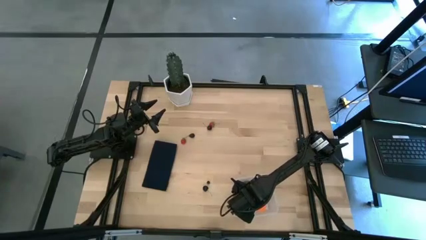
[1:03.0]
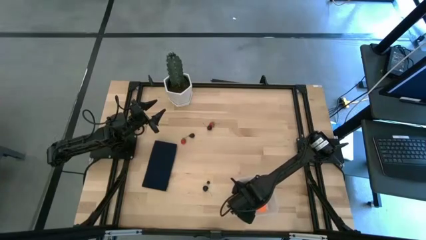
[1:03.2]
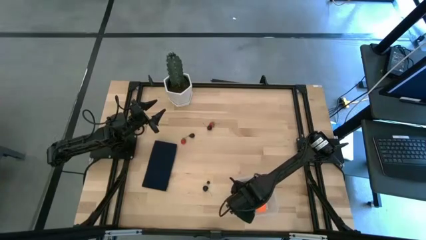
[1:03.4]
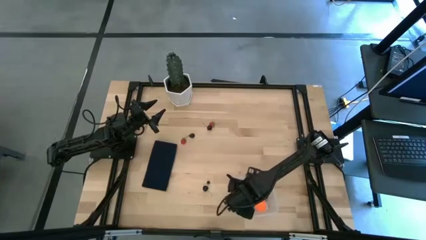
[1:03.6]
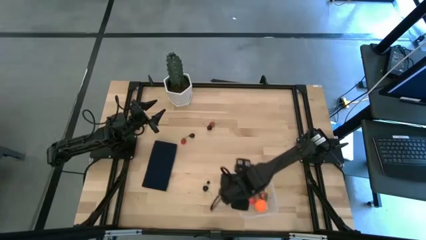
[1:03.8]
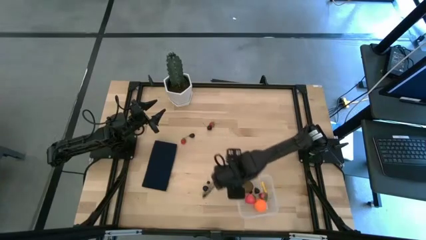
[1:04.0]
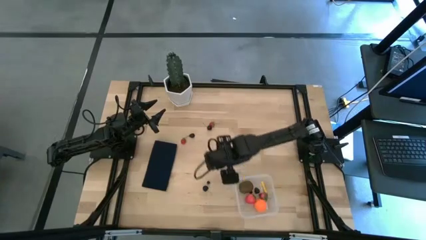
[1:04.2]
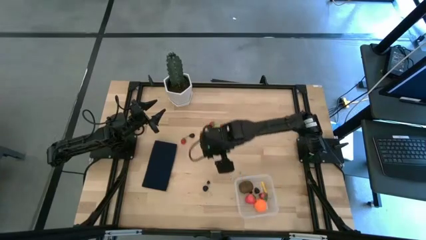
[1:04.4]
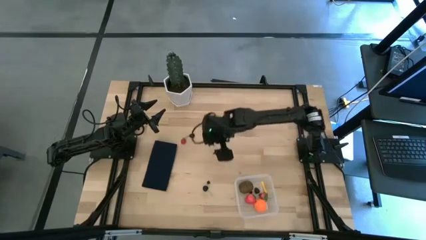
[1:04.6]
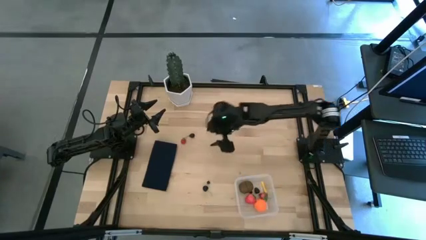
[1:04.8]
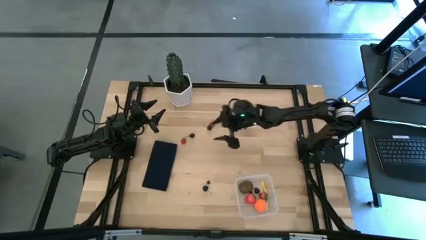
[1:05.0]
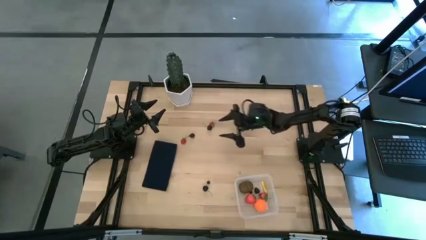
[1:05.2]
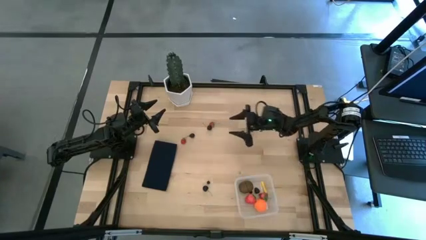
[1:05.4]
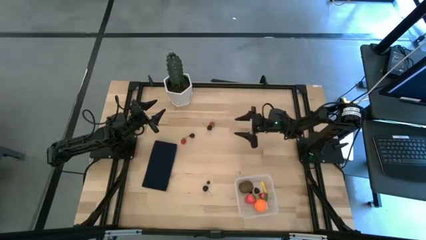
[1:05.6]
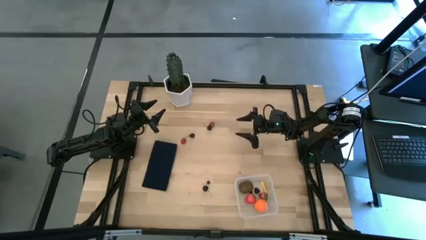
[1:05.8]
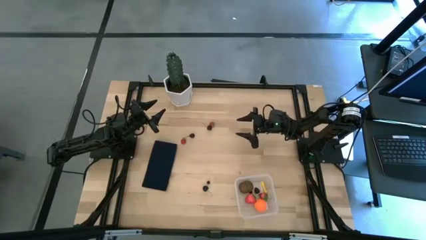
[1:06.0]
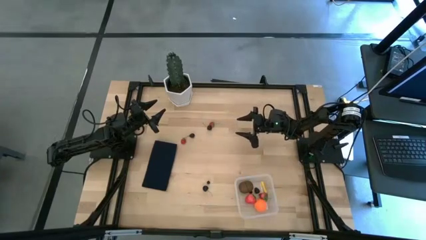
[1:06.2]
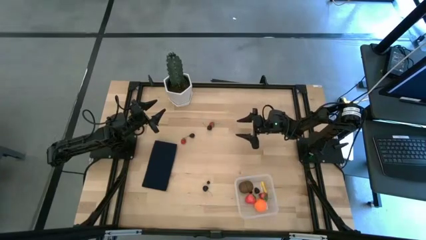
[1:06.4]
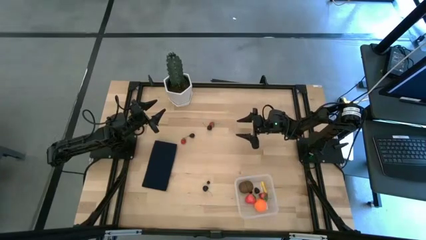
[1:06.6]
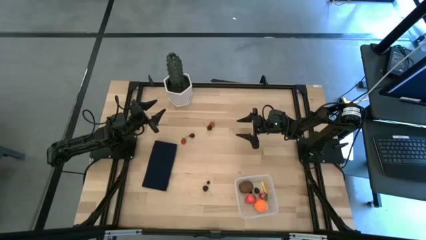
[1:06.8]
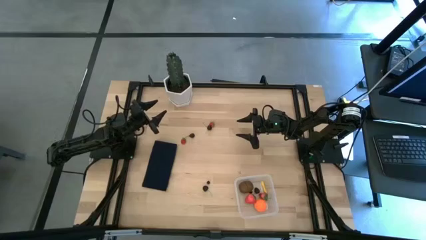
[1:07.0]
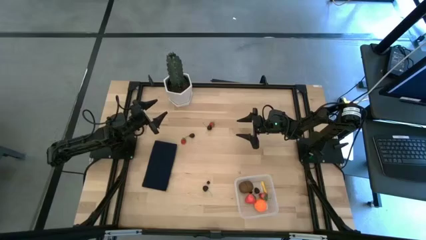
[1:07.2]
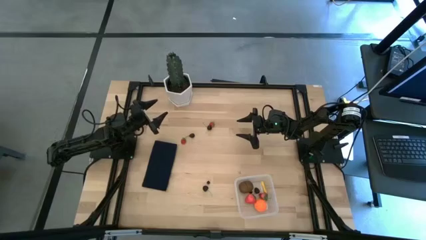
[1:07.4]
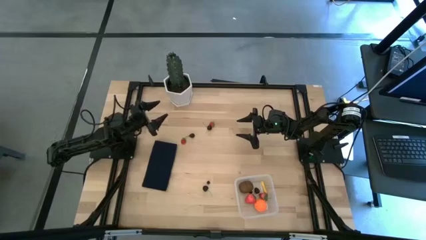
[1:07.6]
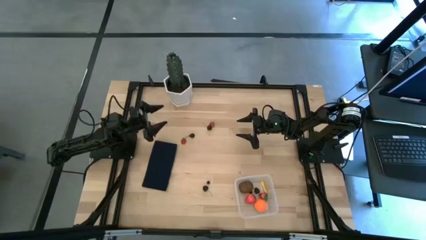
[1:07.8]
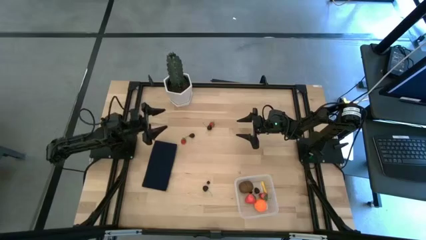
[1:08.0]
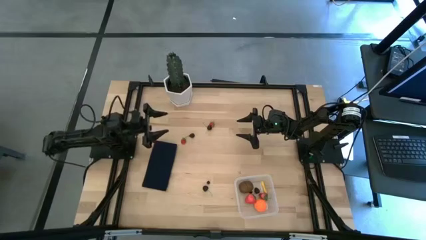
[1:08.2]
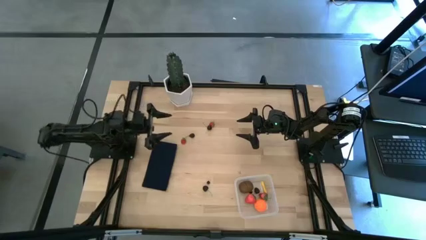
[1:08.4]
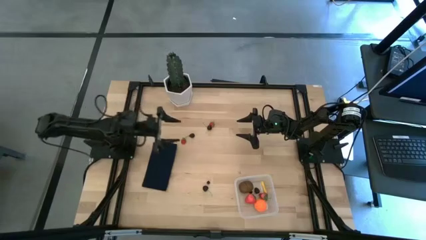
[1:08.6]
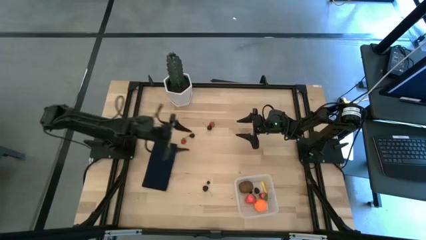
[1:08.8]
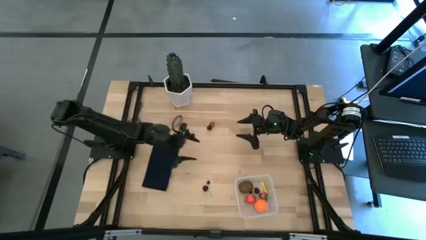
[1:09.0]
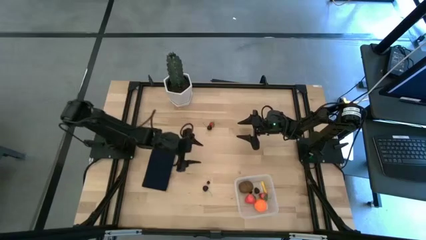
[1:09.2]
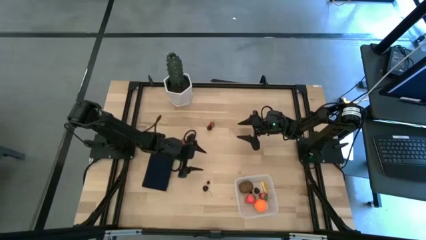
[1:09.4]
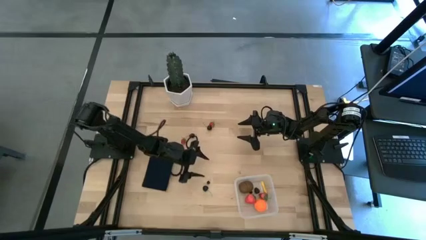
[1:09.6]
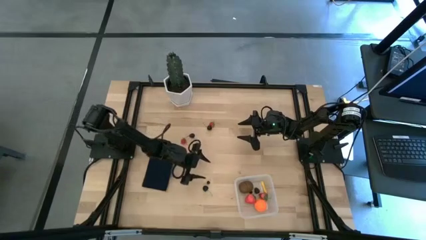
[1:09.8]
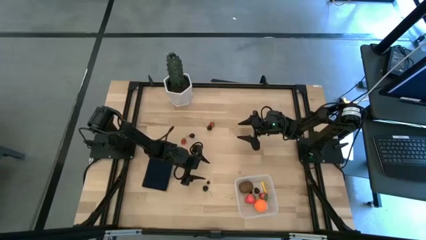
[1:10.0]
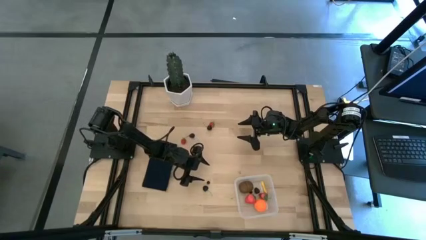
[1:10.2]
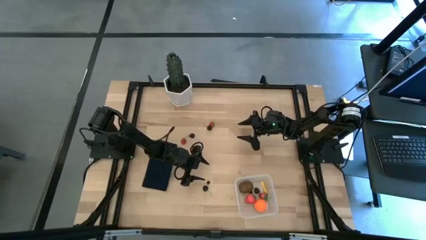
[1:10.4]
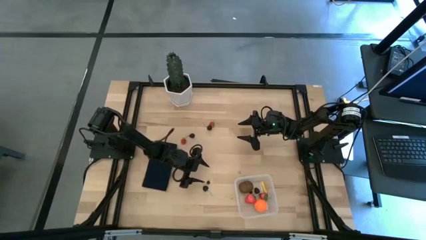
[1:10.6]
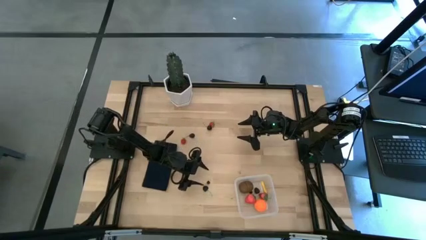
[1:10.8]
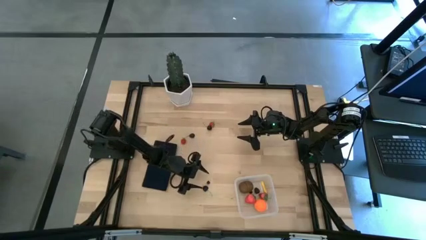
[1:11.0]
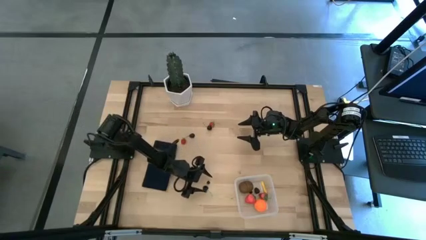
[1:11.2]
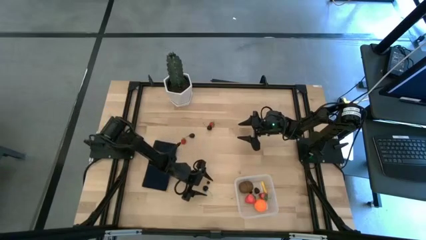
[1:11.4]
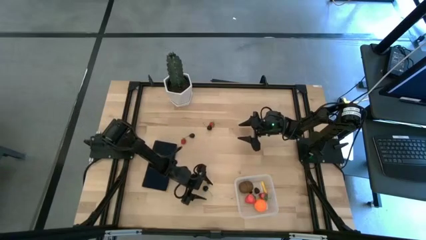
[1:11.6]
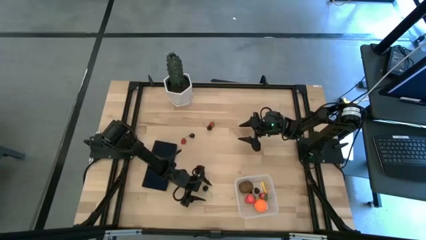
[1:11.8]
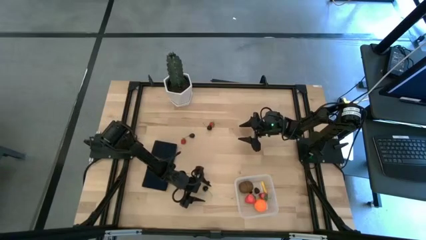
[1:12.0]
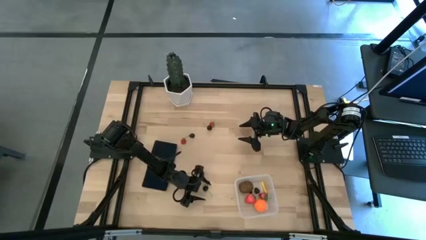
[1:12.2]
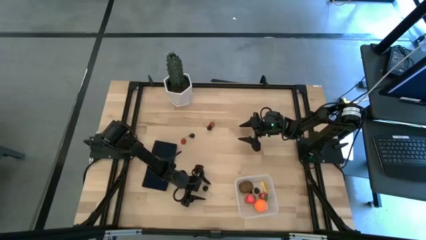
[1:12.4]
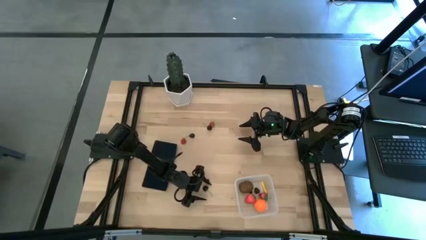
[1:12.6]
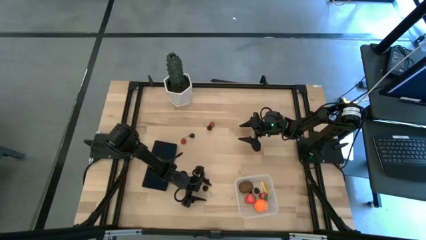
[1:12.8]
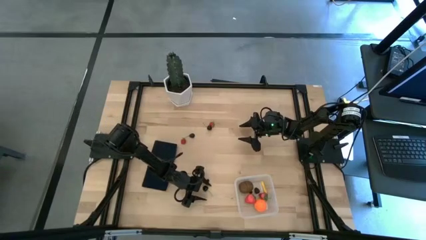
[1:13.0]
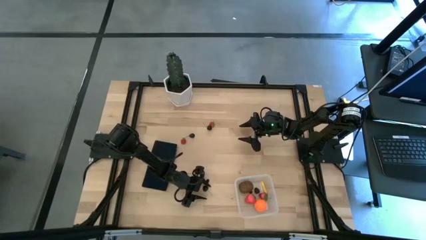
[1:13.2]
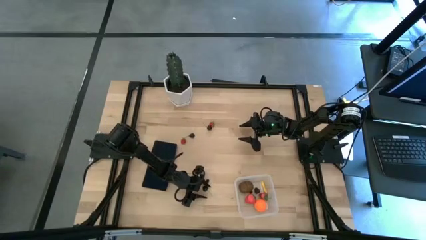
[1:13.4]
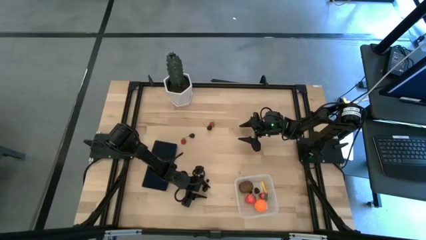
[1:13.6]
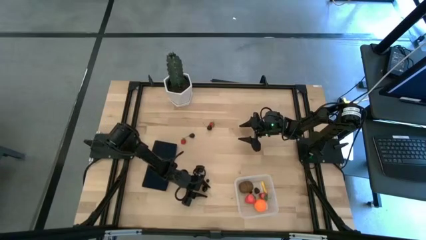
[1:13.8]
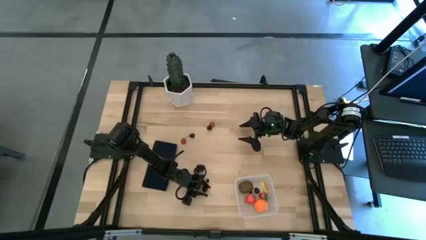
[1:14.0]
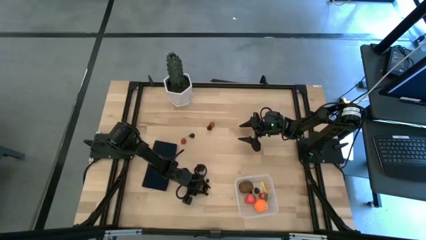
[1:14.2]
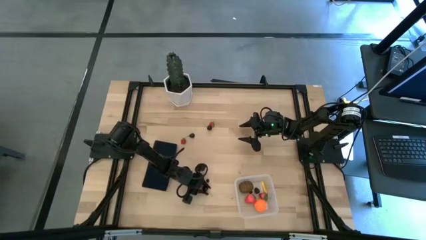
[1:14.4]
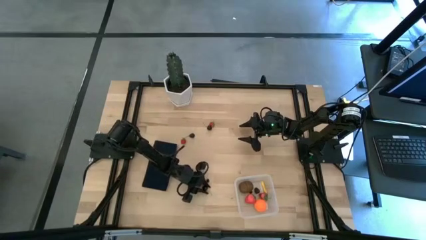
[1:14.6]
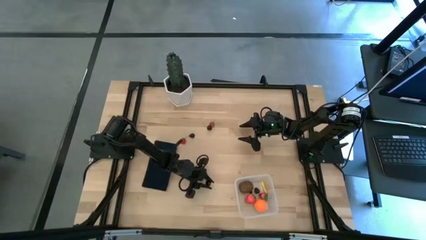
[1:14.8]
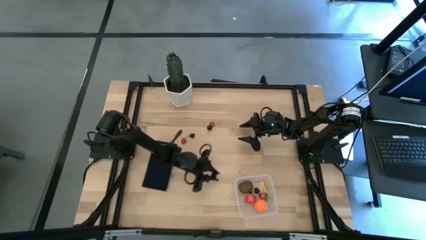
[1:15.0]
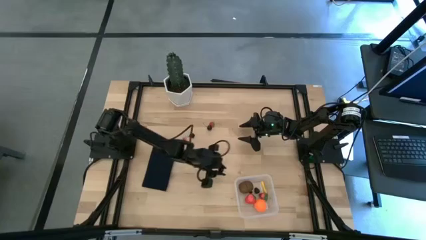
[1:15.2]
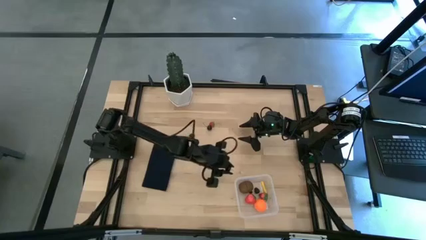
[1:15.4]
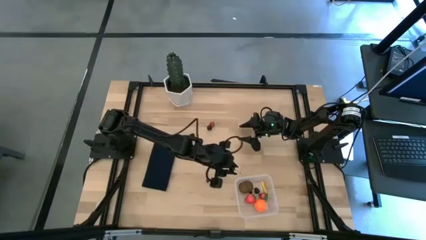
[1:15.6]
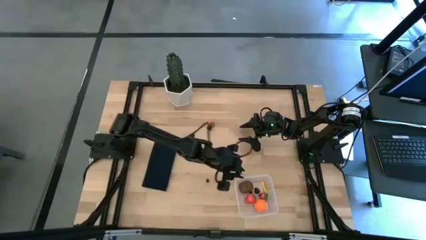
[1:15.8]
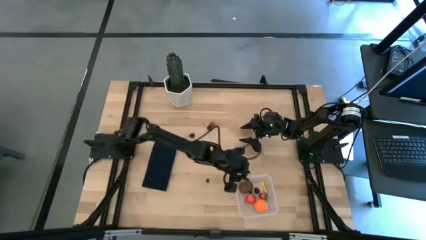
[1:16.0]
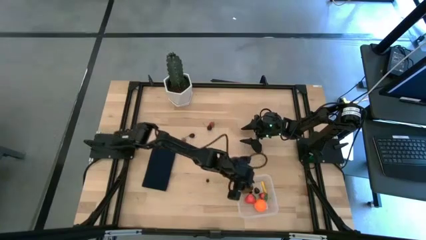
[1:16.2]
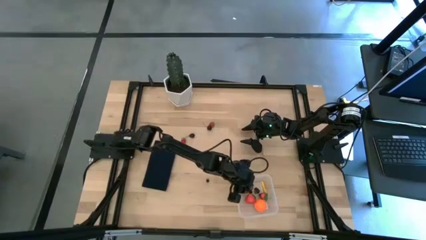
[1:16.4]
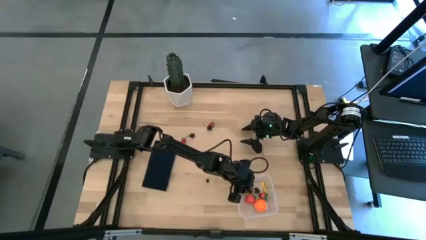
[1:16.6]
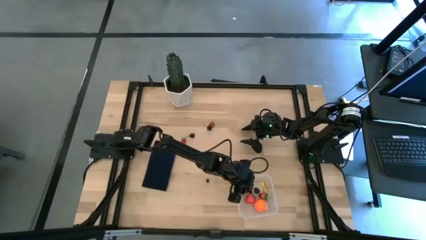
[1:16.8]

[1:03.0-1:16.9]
Task: Pick and placing Produce into tupperware
Put the bottom cherry into the transparent bin
